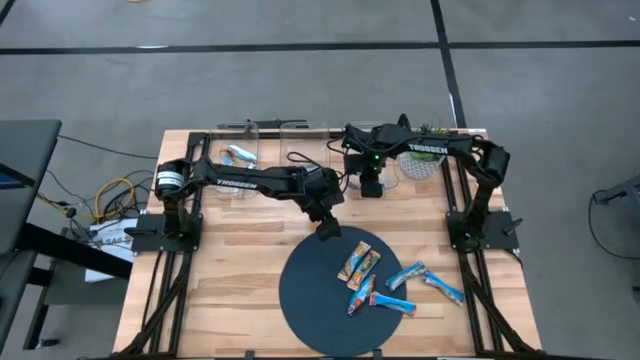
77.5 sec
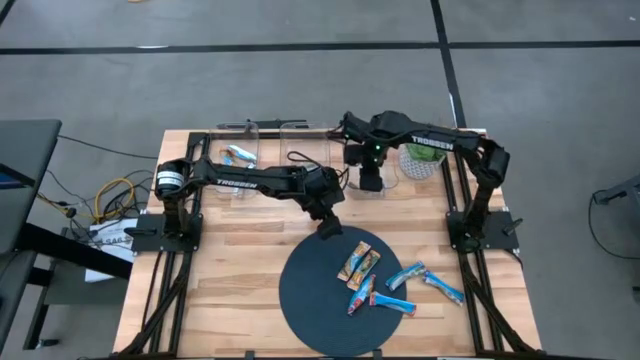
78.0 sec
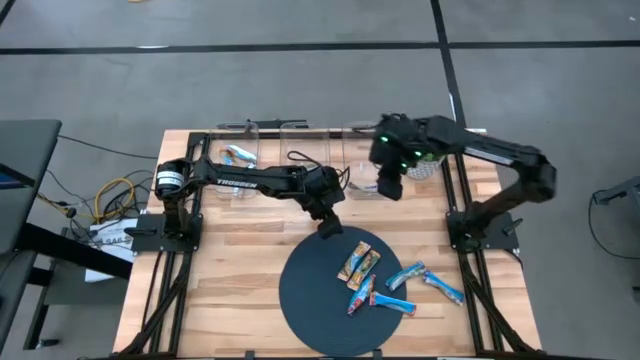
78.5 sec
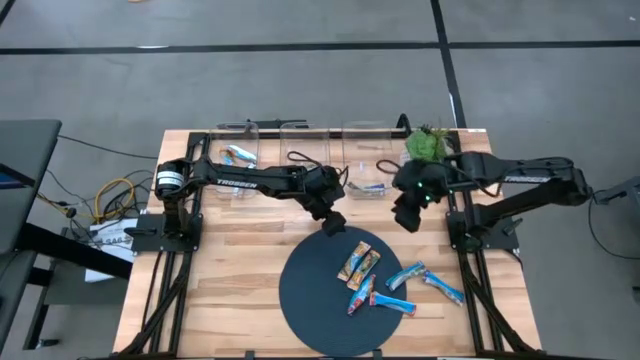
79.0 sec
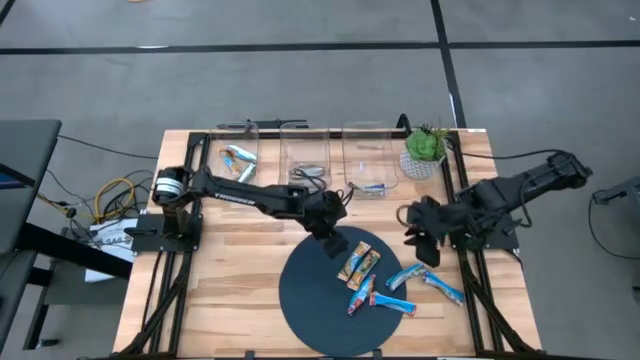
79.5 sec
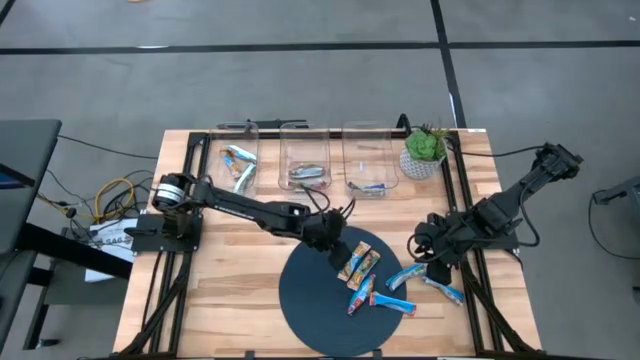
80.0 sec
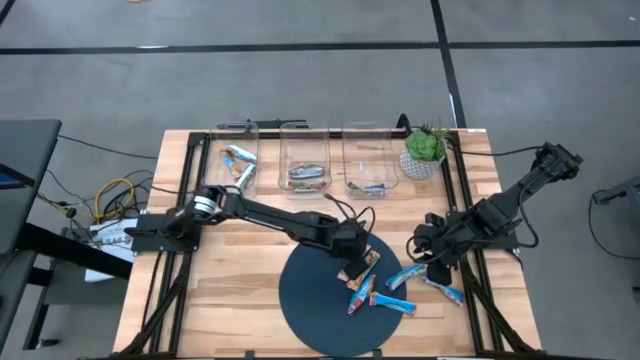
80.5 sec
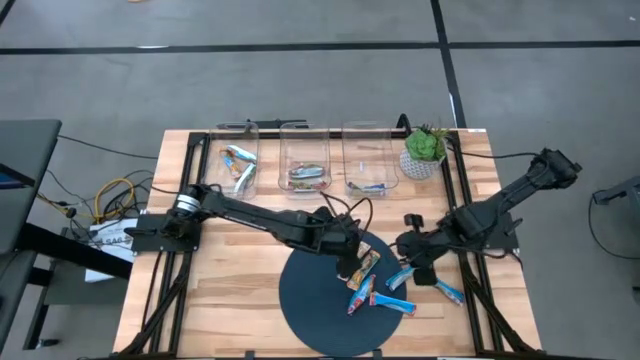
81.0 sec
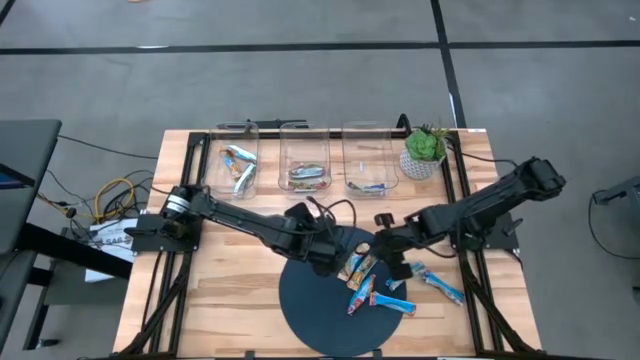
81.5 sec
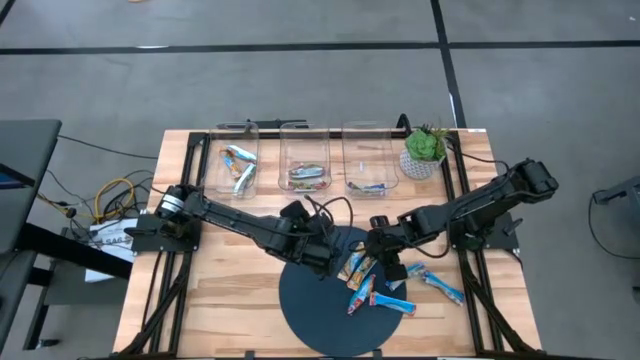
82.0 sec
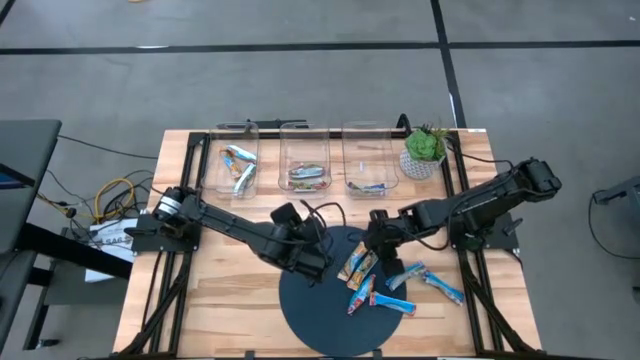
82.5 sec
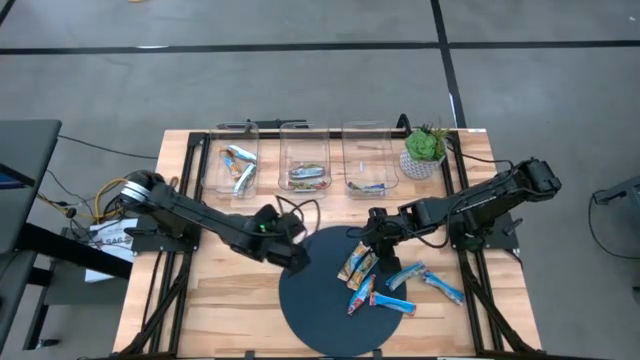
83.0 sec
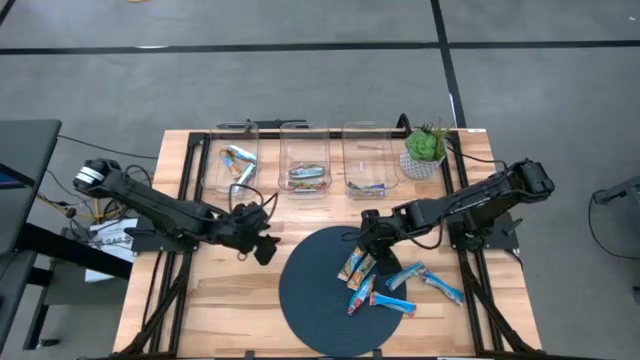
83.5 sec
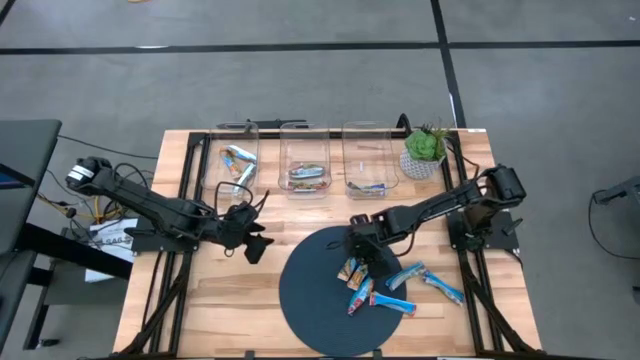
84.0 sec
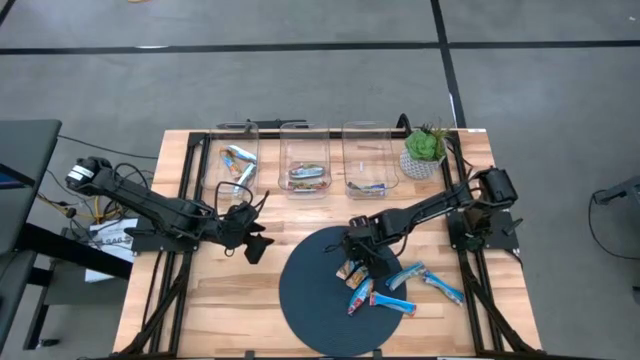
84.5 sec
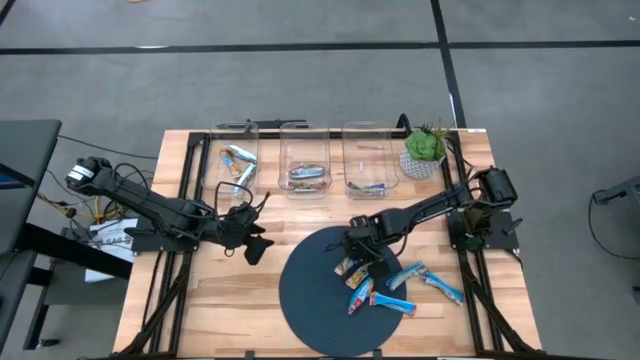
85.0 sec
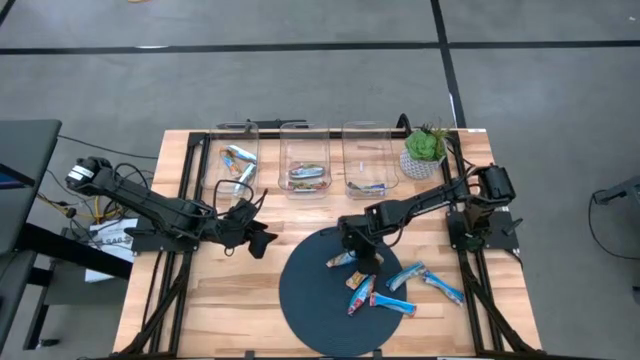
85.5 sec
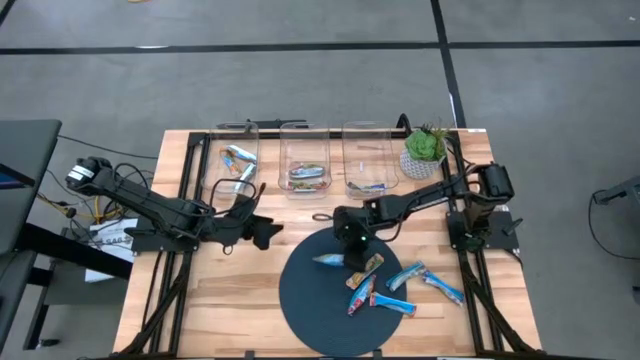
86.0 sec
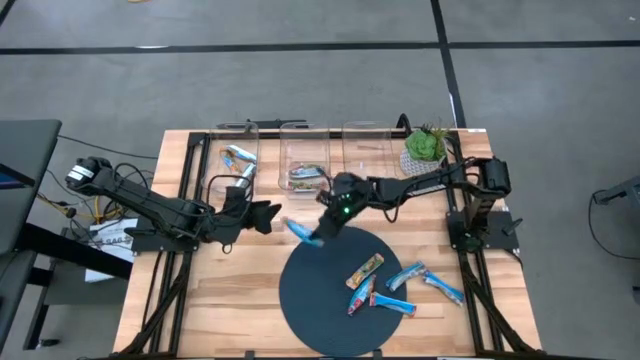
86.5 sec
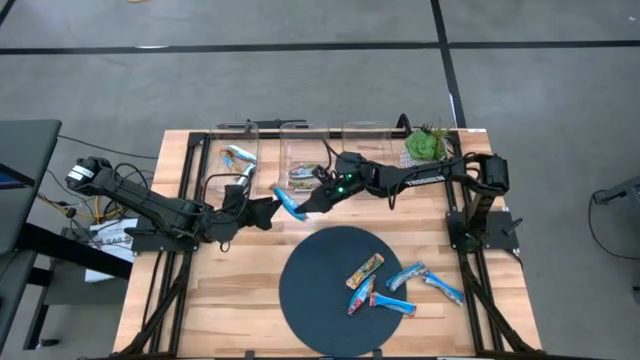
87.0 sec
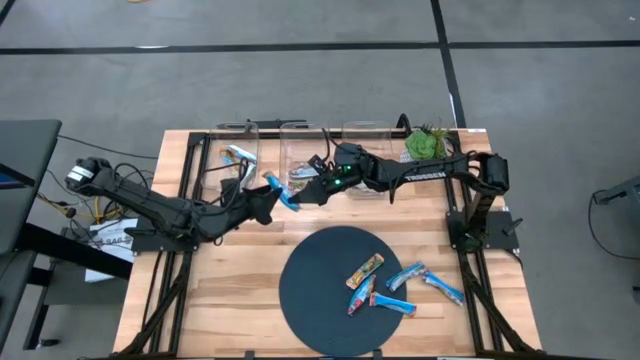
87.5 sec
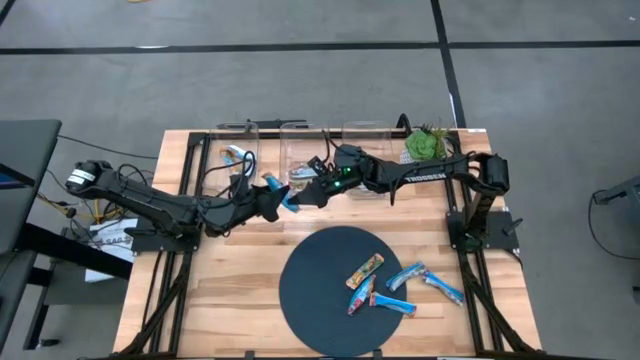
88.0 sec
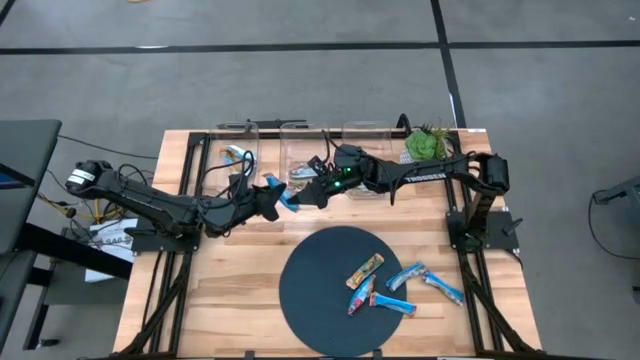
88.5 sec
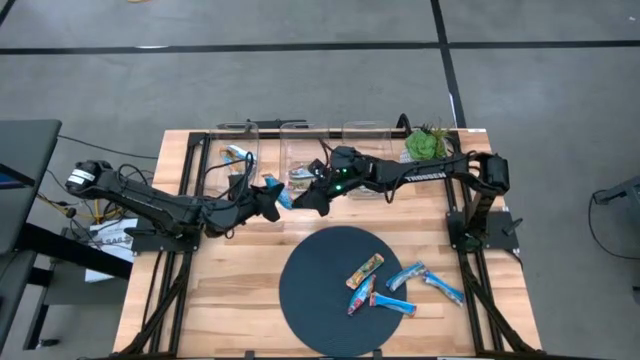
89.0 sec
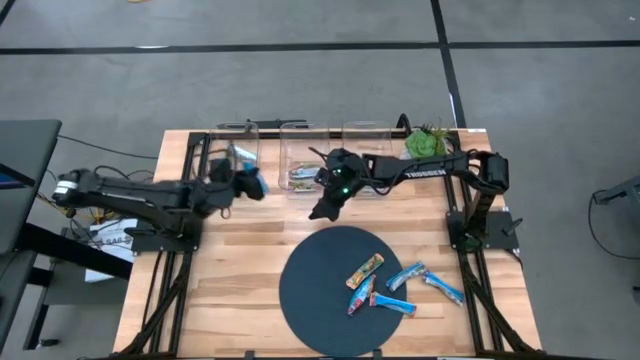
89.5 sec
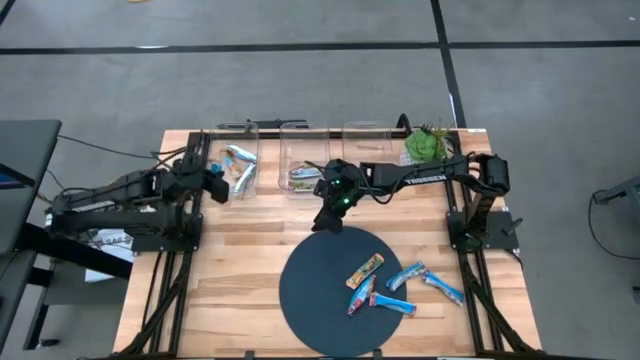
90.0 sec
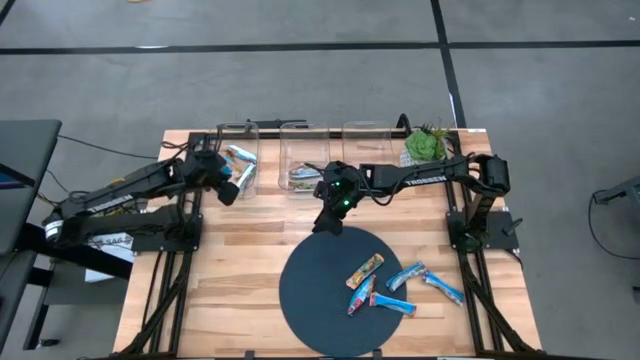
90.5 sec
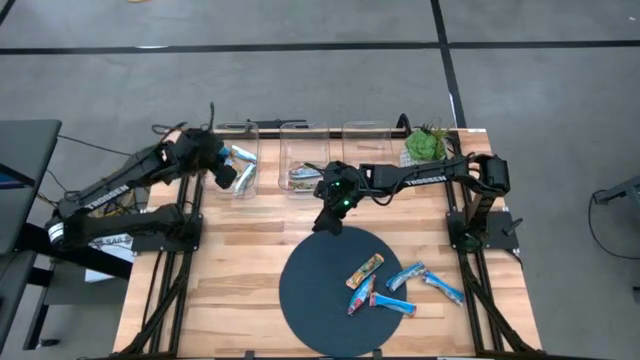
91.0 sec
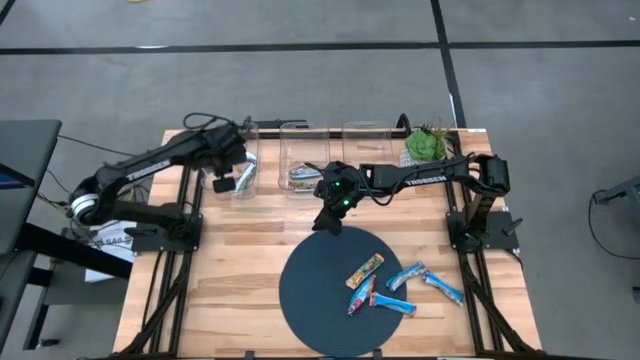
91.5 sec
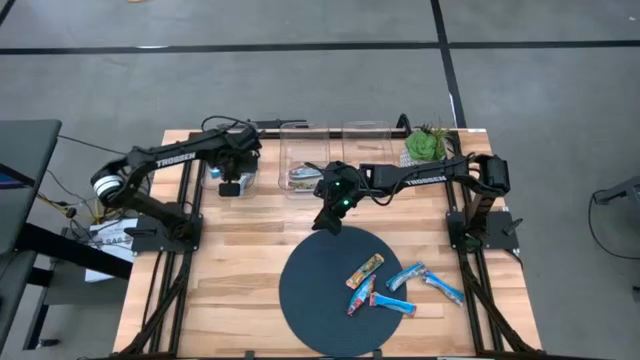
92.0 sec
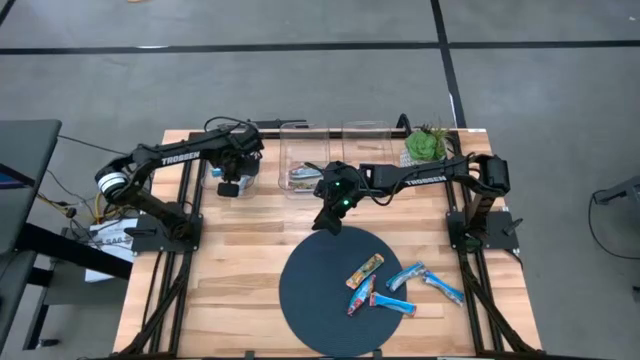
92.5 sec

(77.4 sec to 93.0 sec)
Task: Pick and place Granola Bars by type
Put the yellow granola bar into the left transparent bin
